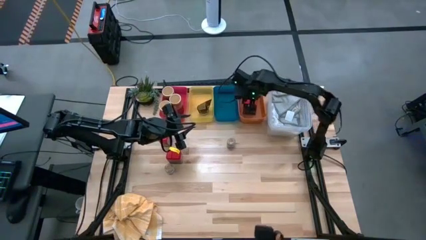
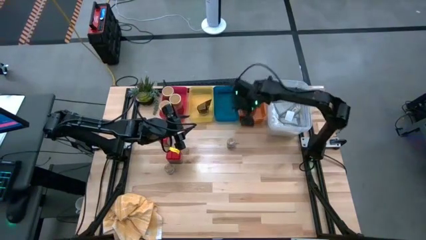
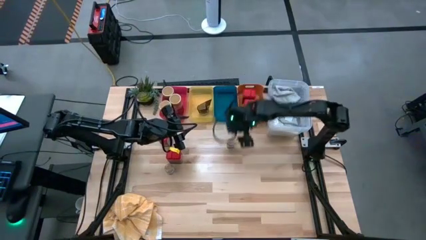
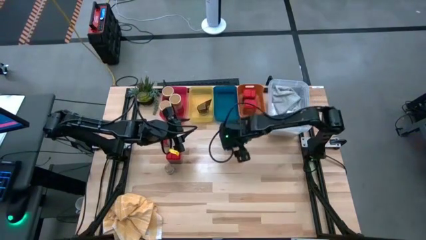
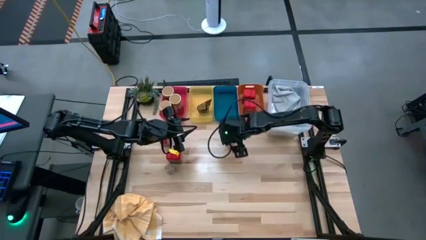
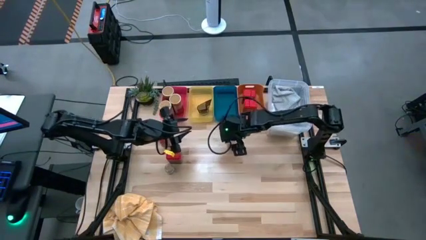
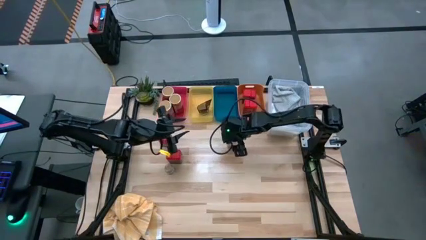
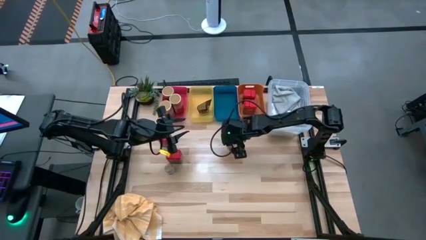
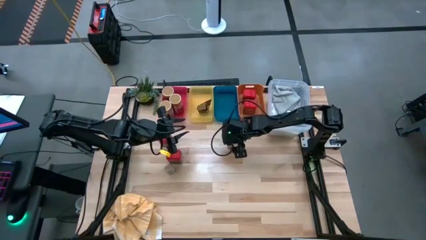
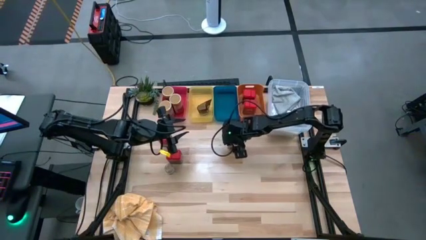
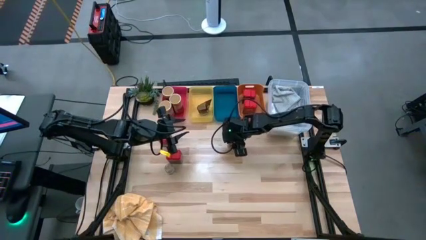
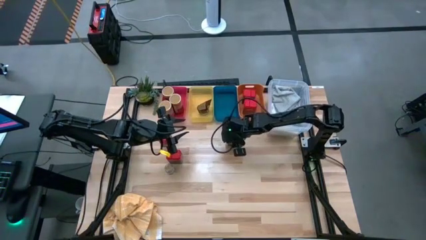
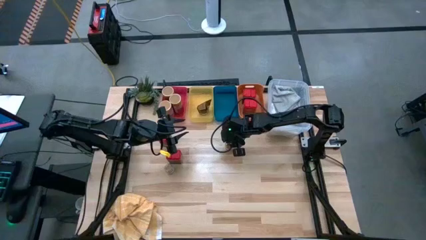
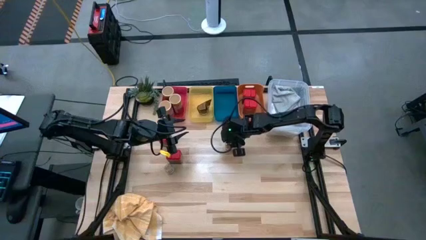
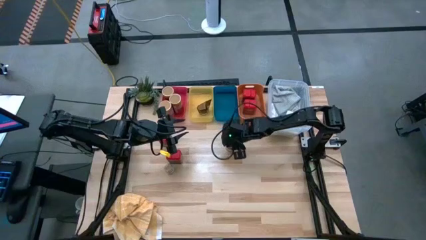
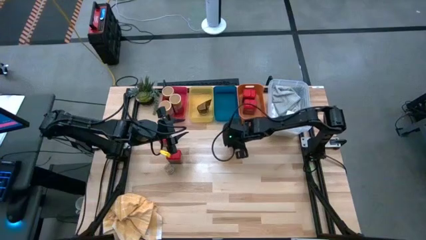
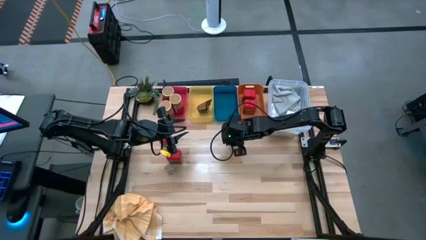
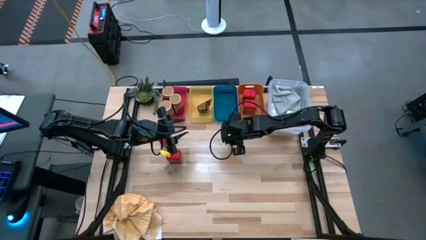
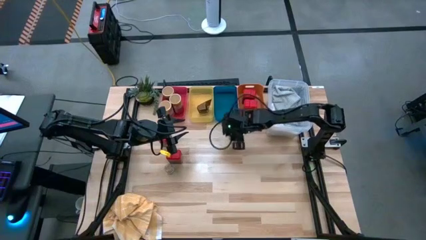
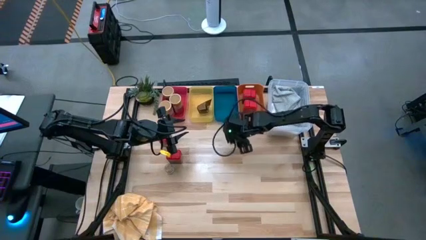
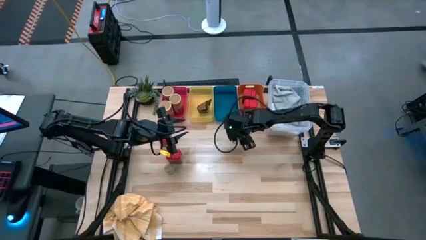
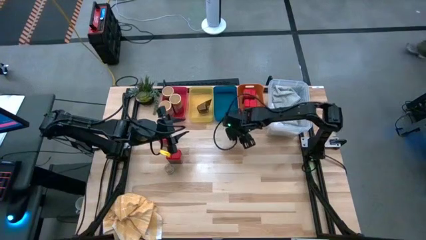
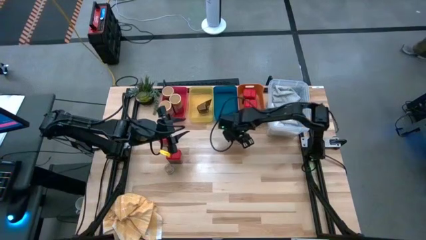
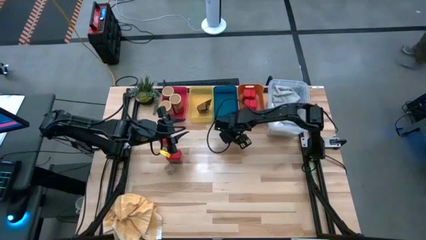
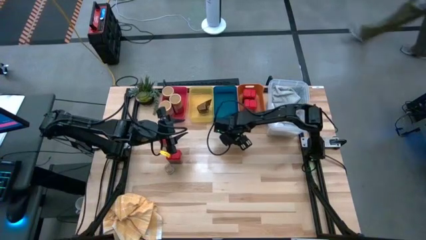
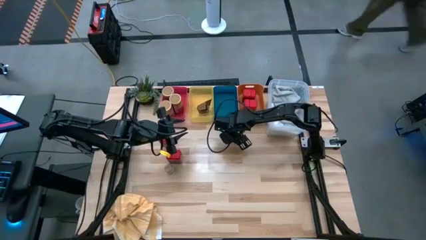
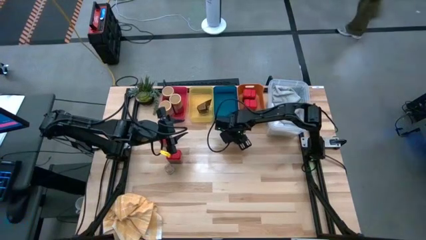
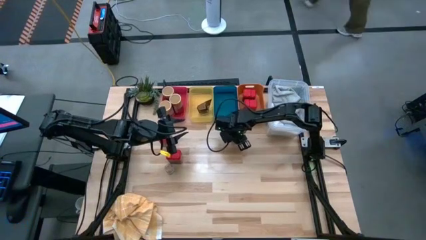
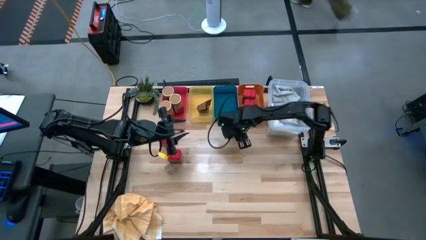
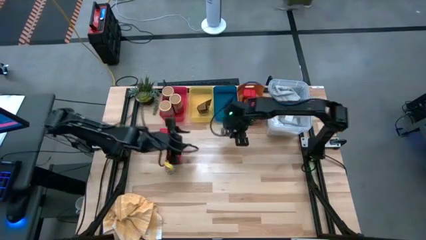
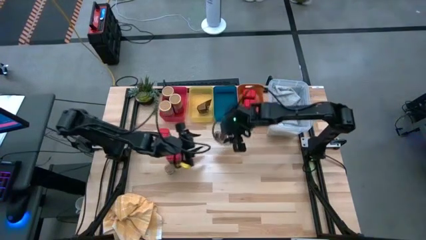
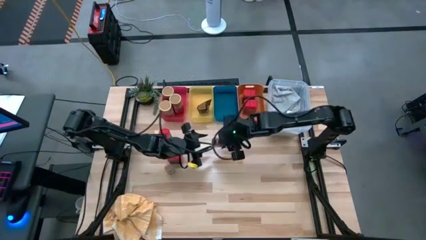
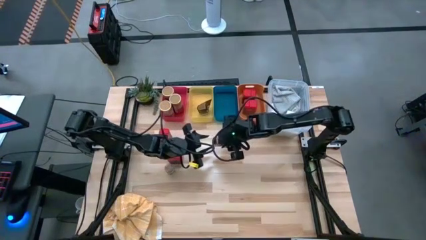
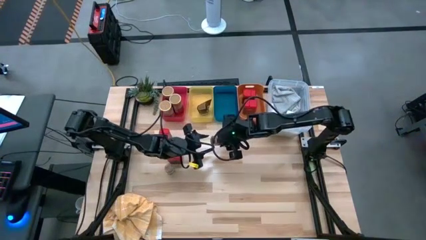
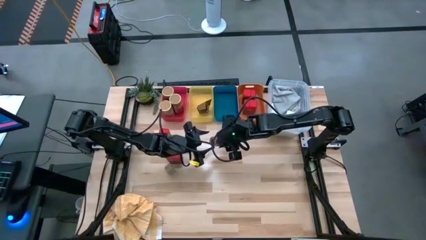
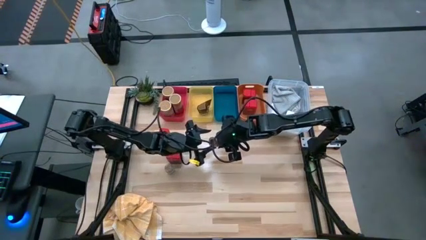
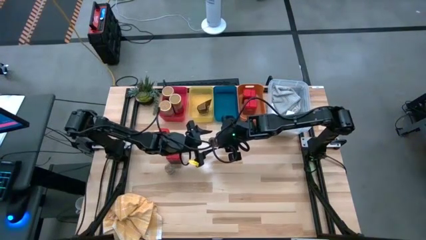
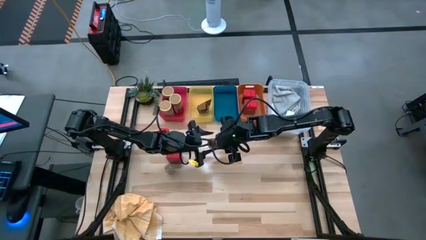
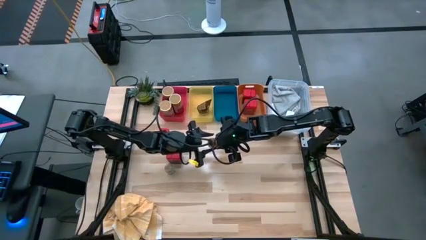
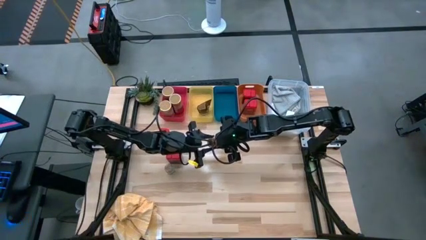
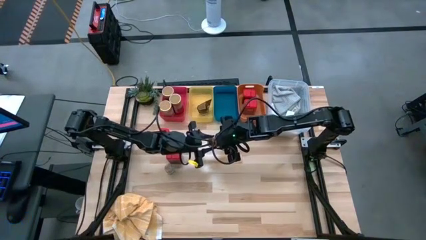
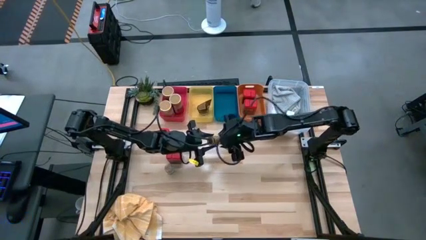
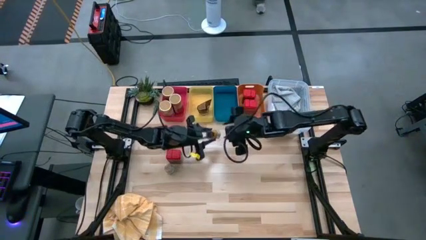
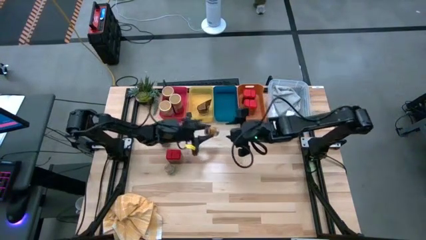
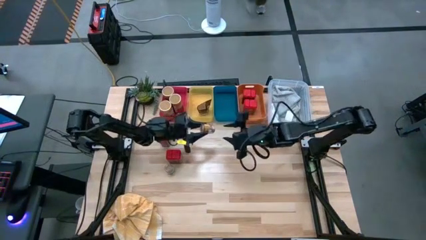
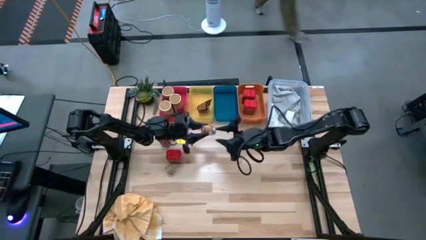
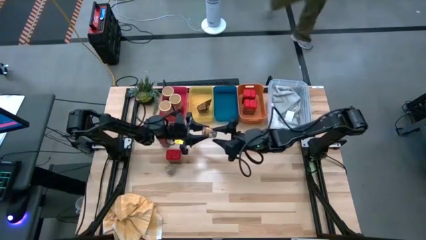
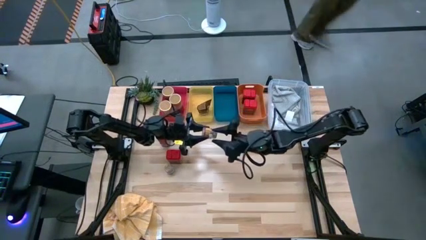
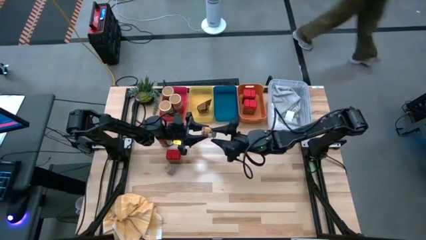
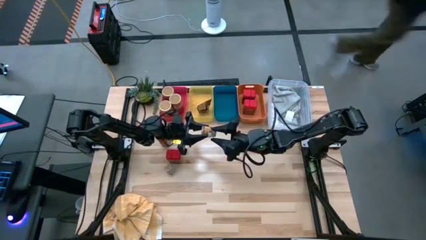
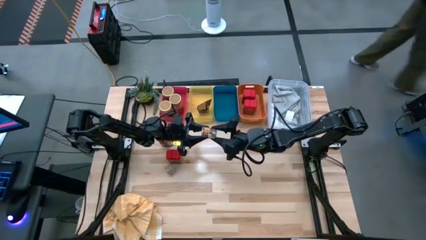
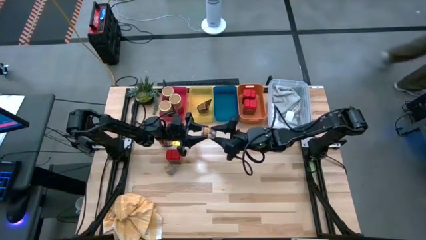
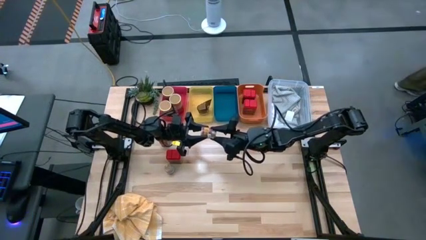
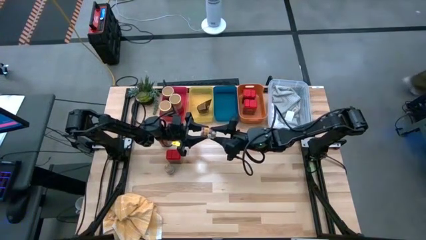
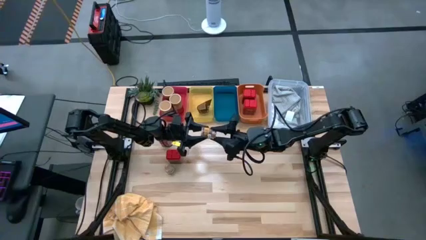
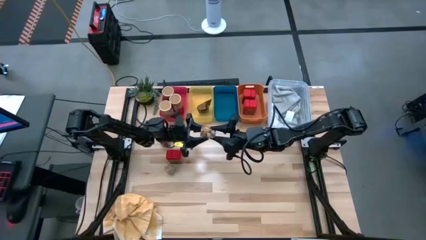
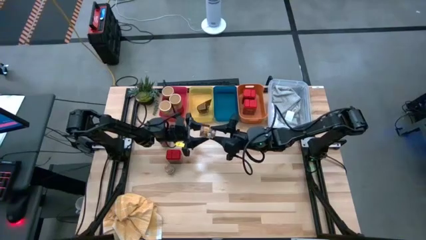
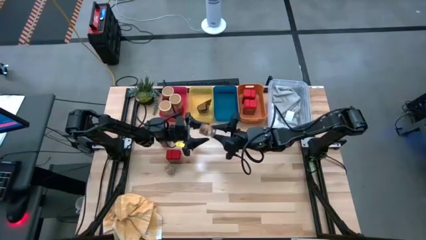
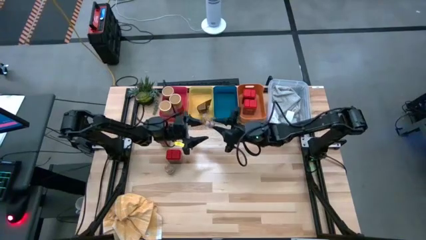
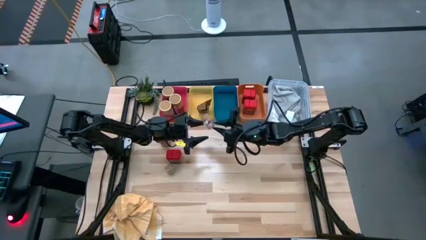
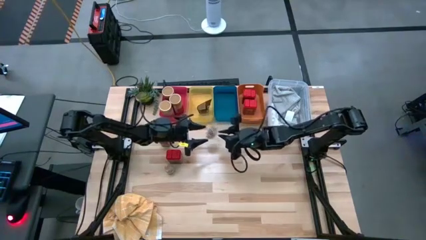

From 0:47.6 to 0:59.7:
Task: Sort spices by type
Put the brown spice bottle into the blue bin
